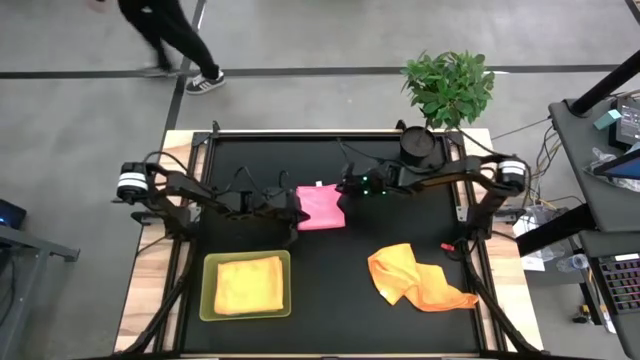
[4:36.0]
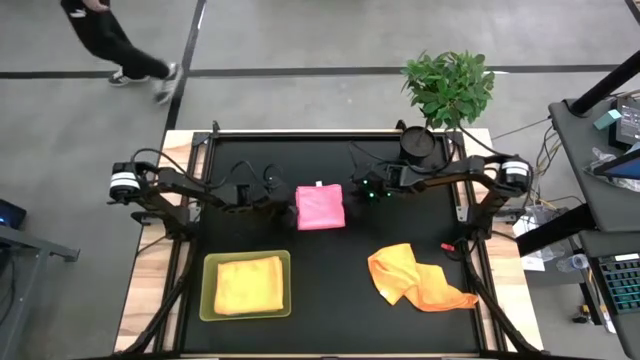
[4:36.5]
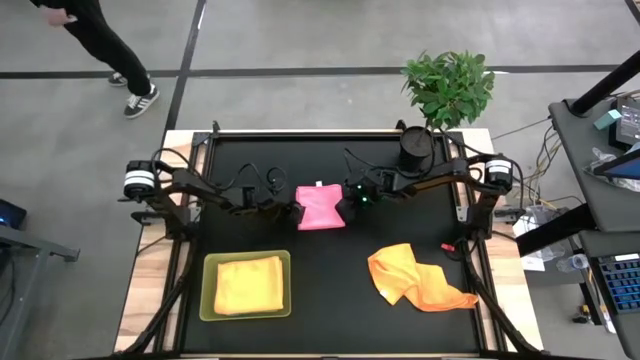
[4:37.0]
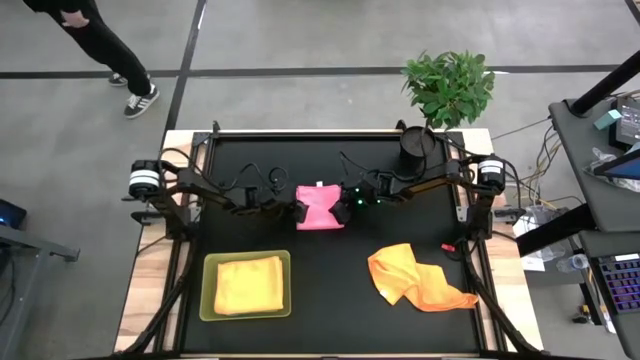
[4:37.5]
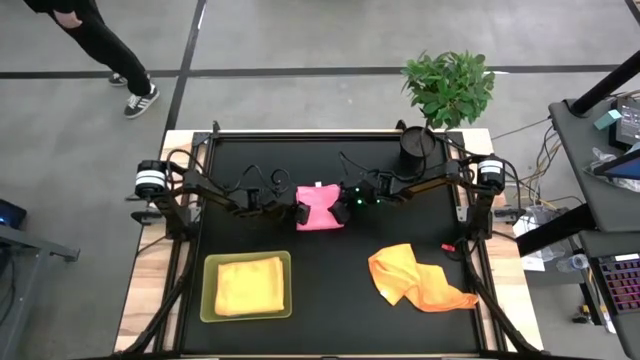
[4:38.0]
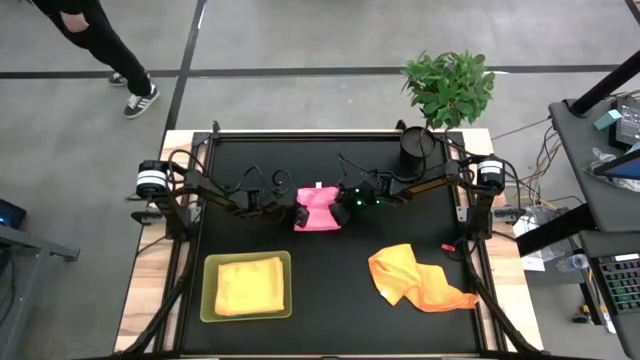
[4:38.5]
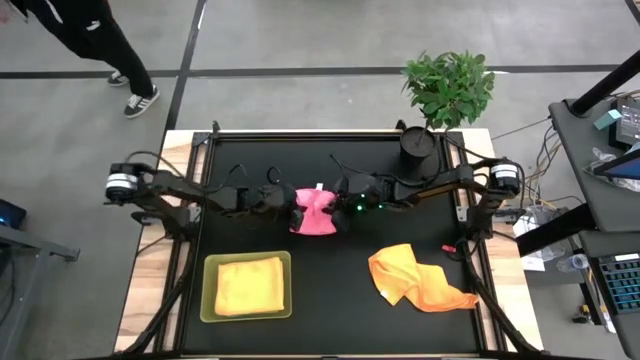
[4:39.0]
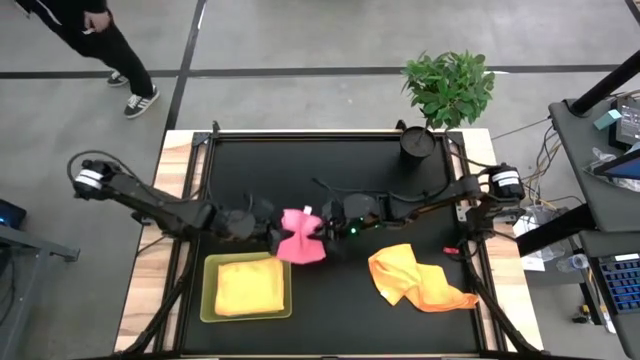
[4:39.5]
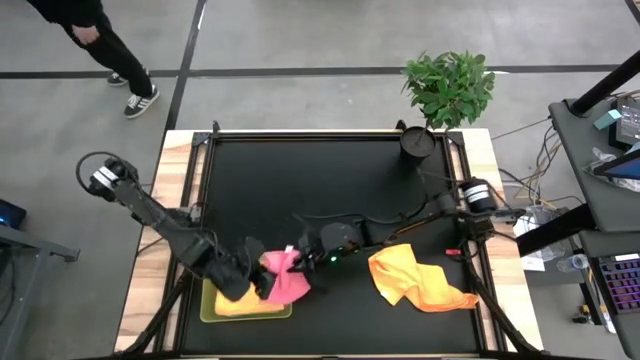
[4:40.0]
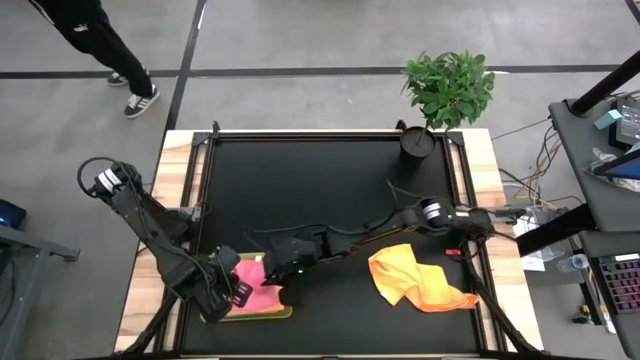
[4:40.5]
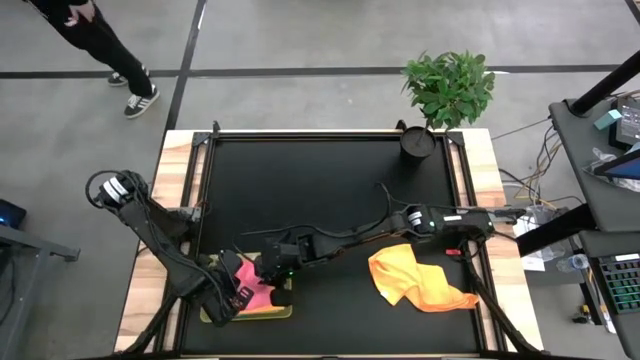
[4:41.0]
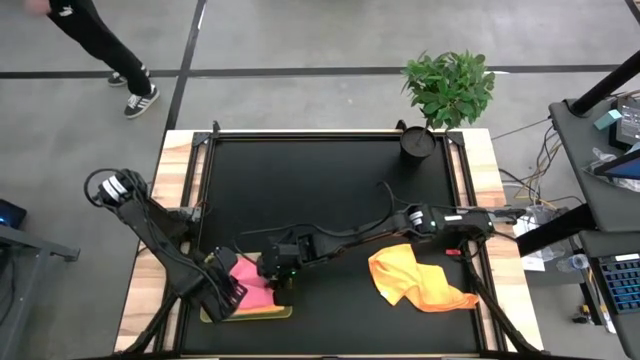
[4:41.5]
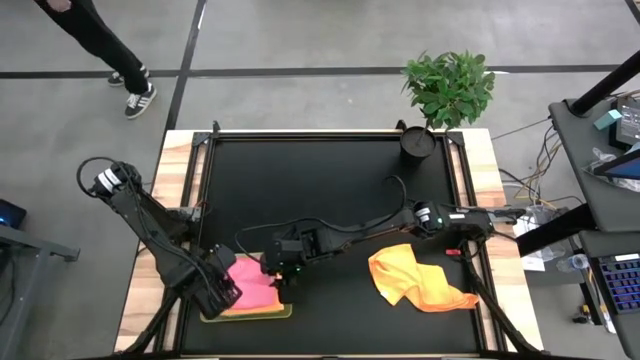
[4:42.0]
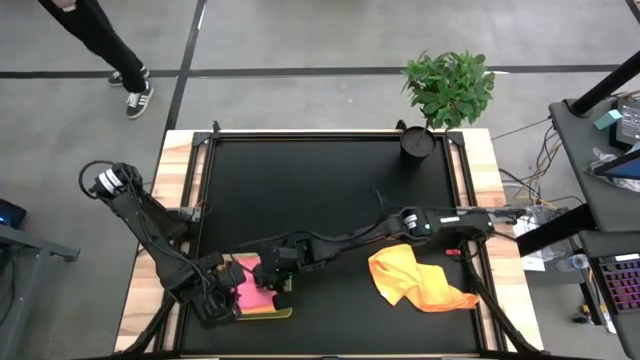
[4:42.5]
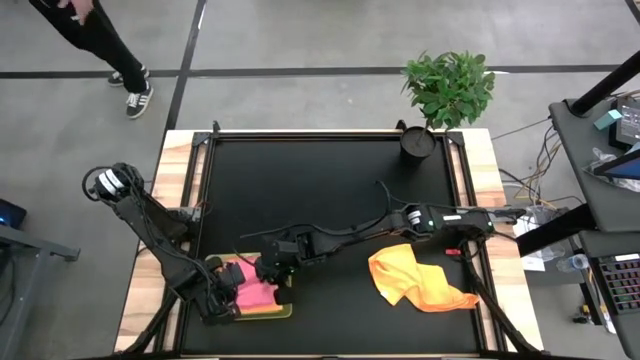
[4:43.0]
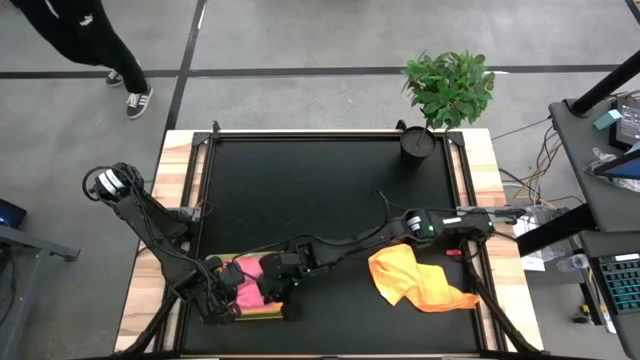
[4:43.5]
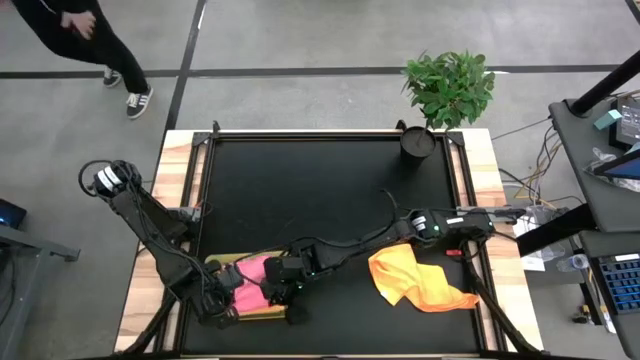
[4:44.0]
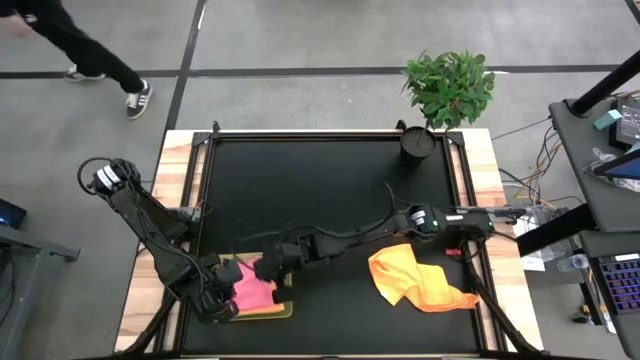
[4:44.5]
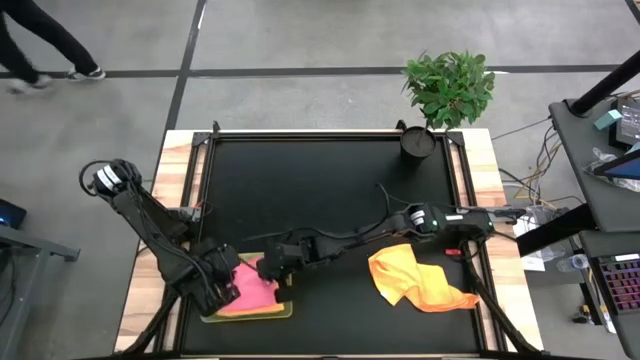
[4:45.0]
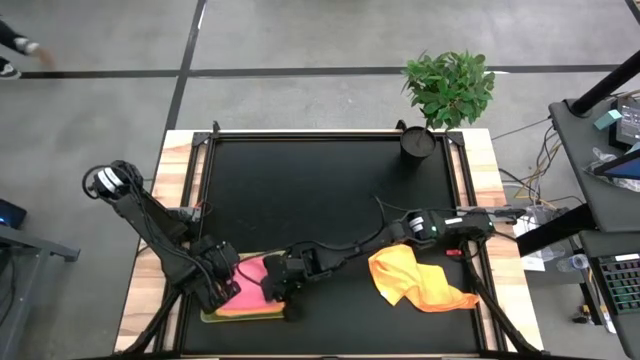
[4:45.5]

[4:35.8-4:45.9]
Task: Fold microfiber towels
Put the folded pink microfiber towel into the yellow bin

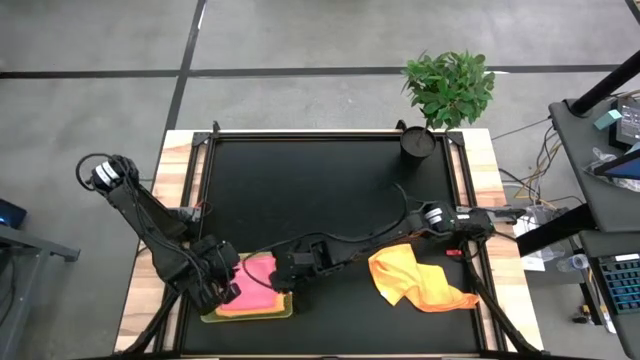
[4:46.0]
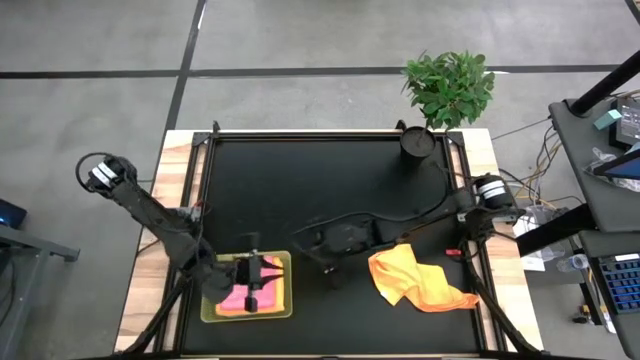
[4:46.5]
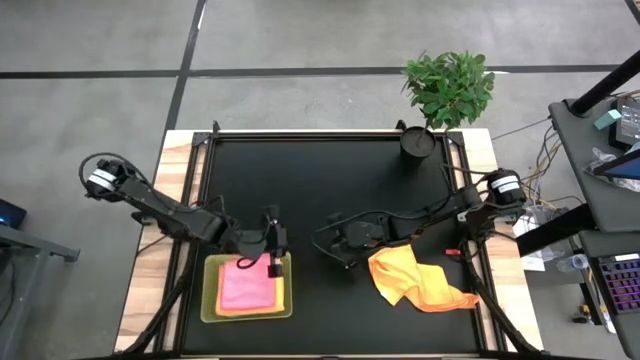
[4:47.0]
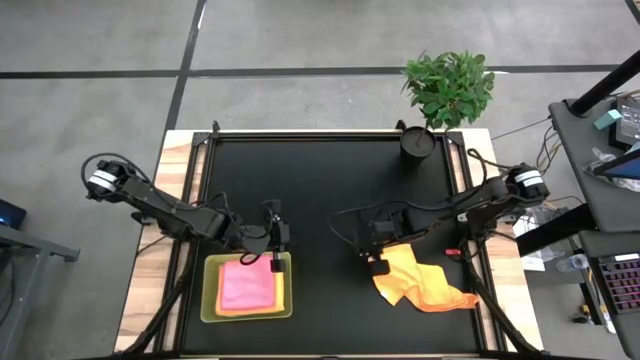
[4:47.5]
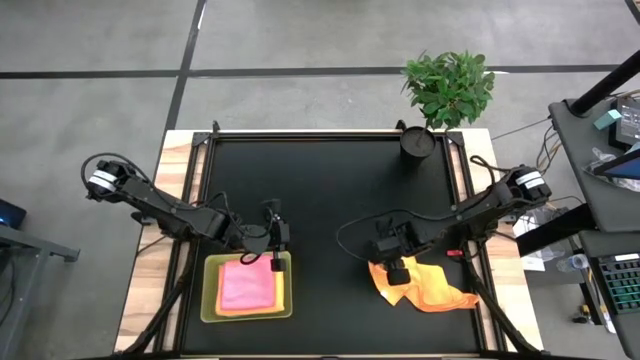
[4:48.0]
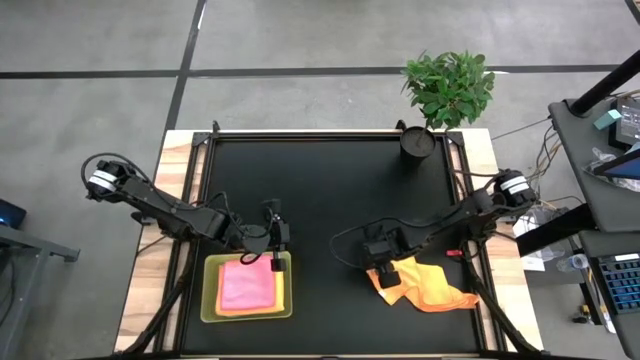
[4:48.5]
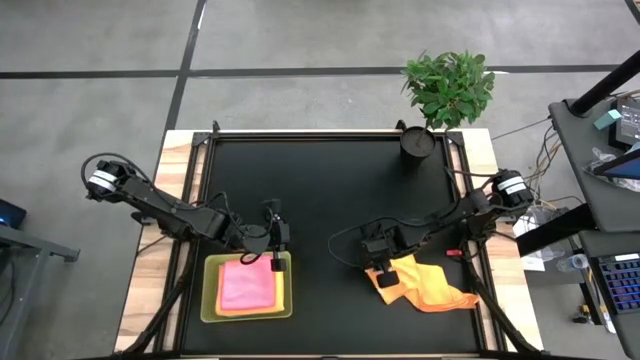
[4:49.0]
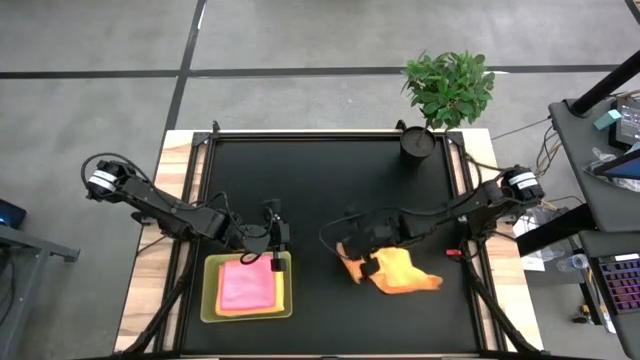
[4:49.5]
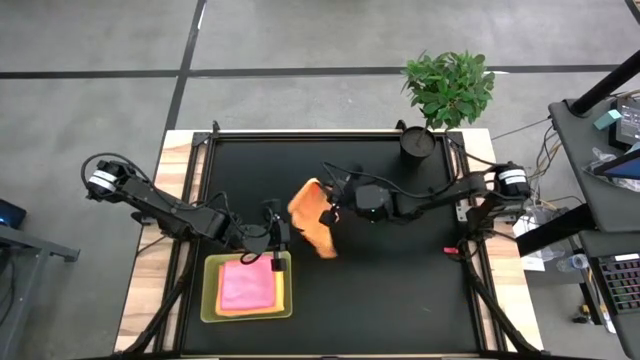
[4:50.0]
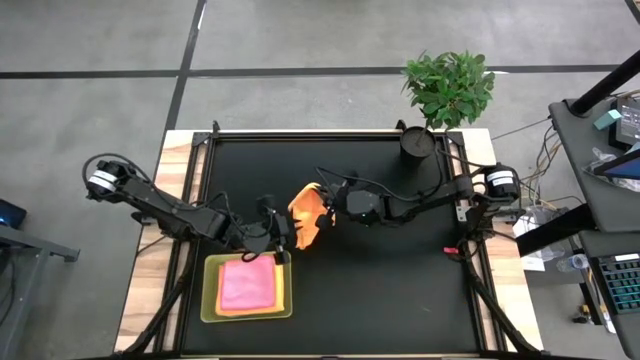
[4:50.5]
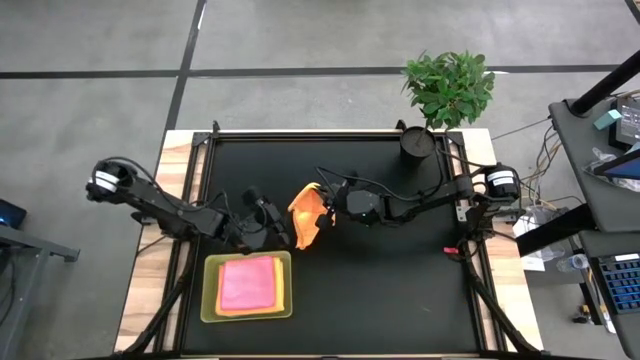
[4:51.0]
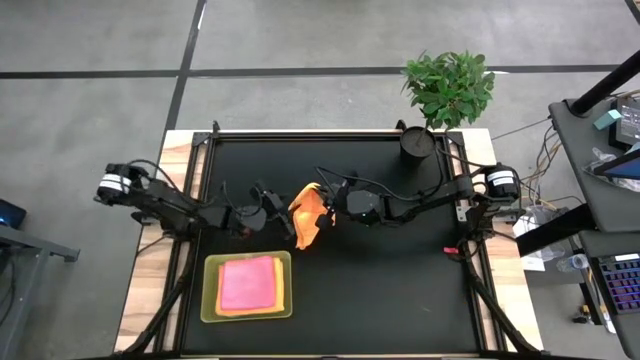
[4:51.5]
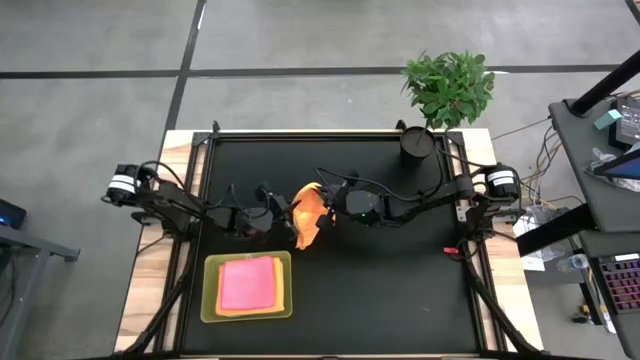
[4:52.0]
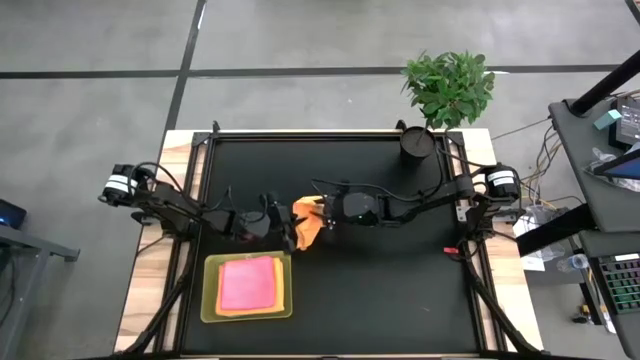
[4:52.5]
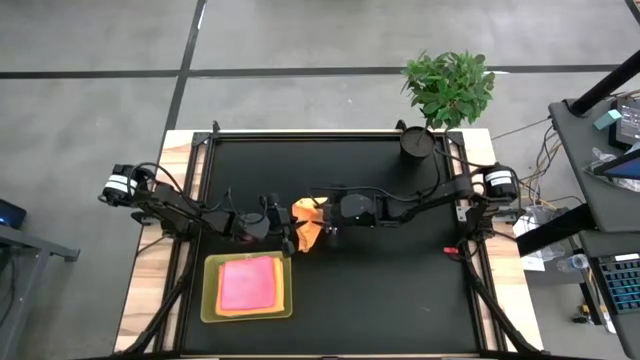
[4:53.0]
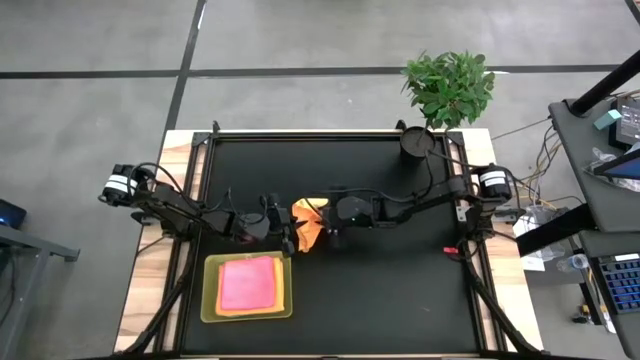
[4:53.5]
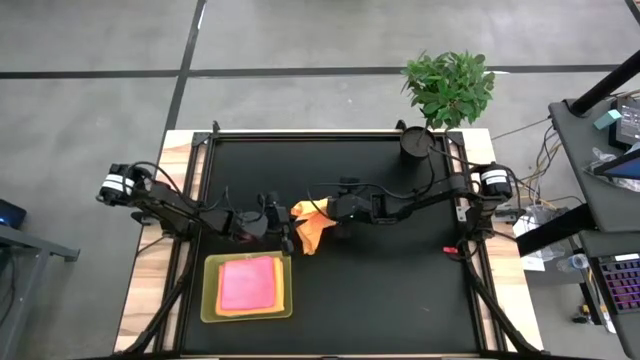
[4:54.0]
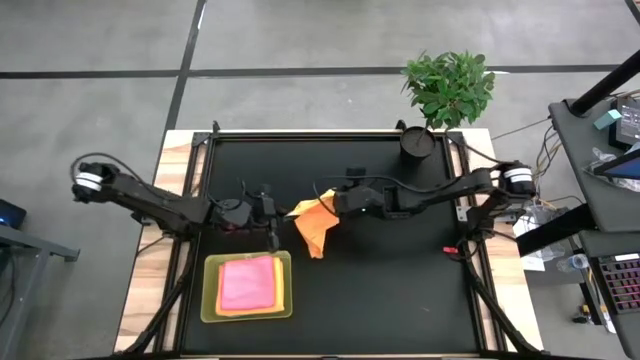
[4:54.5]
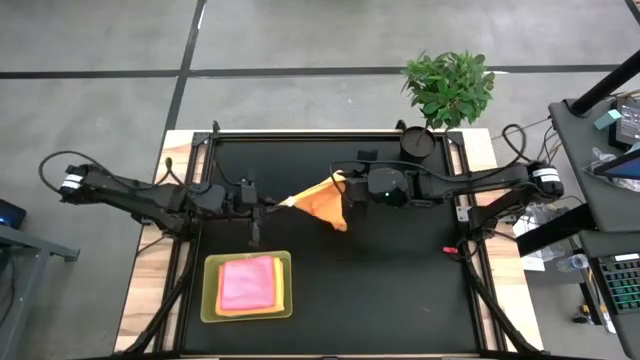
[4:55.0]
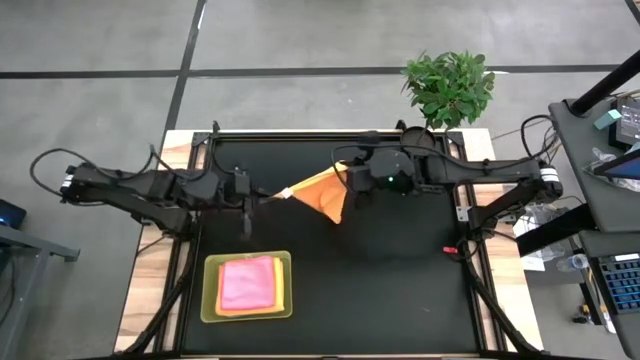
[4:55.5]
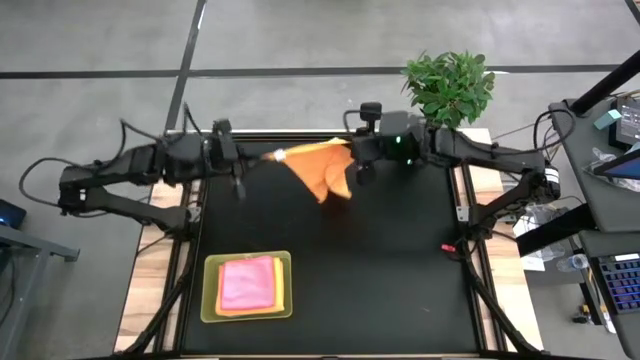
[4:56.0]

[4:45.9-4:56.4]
Fold the orange microfiber towel

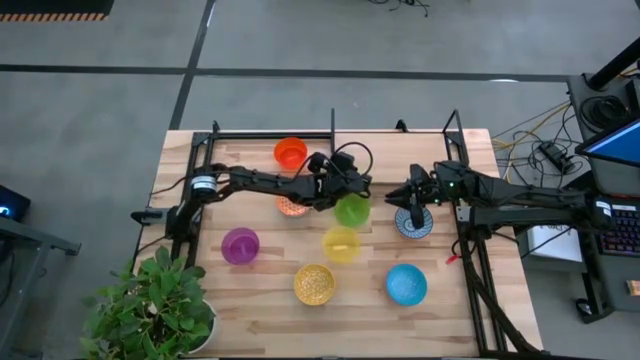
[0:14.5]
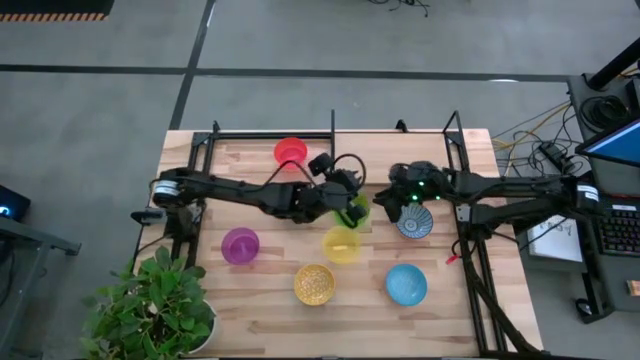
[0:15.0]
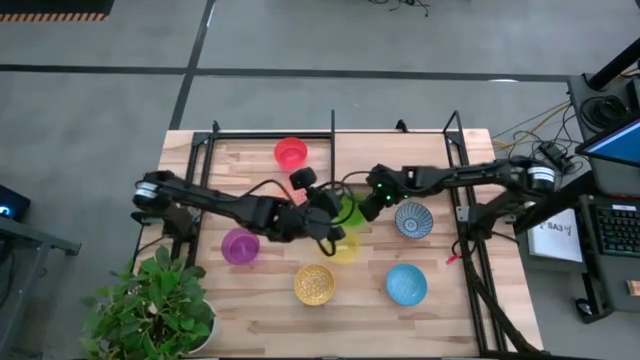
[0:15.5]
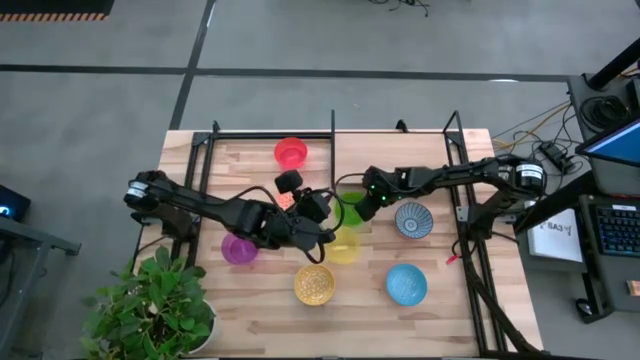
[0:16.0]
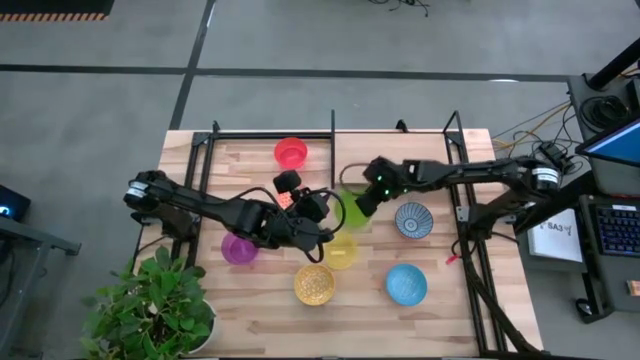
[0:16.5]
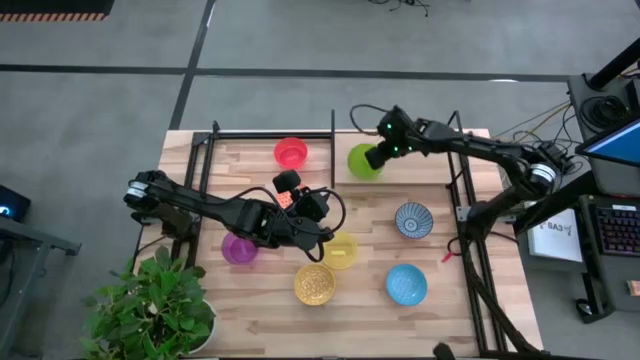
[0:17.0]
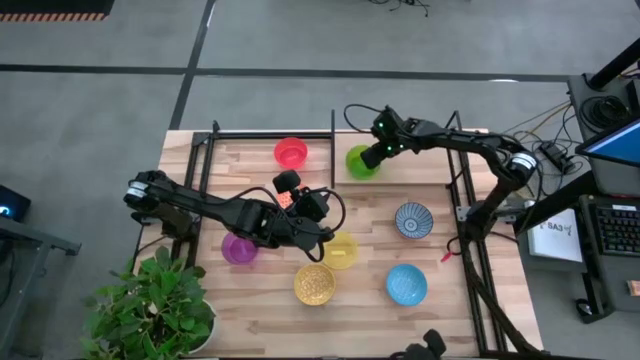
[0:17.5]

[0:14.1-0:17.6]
Task: Place and stack bowls onto a shelf
Put the green bowl on the shelf
